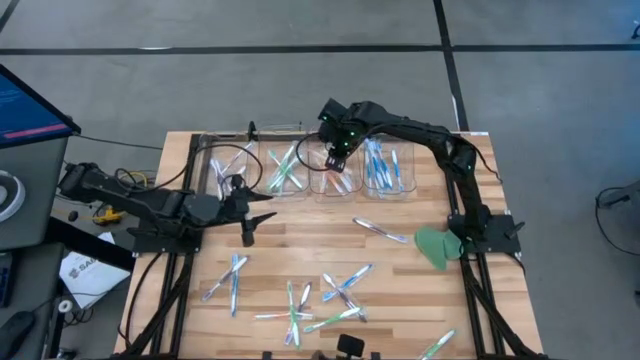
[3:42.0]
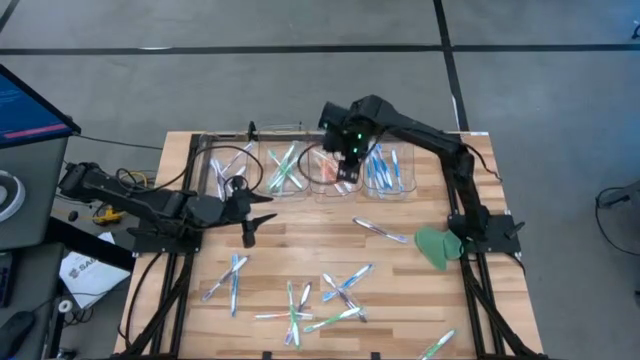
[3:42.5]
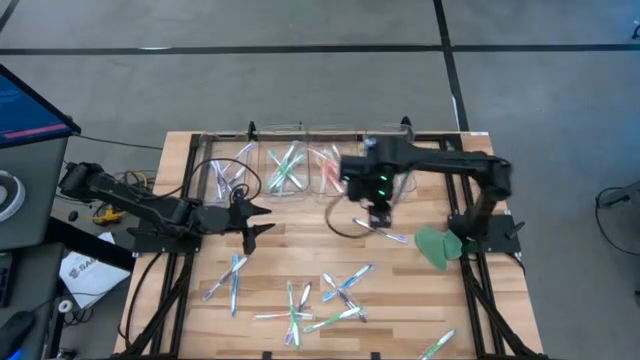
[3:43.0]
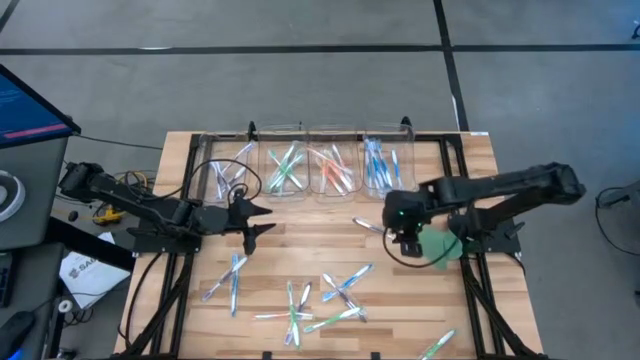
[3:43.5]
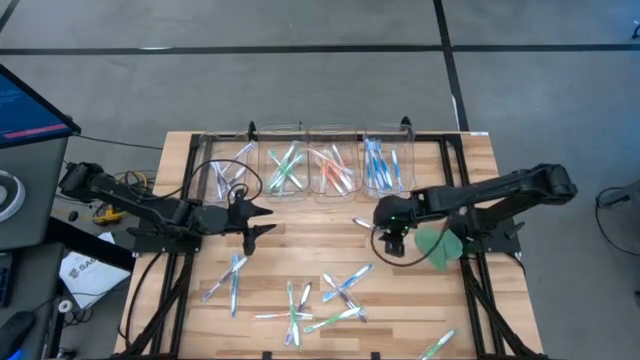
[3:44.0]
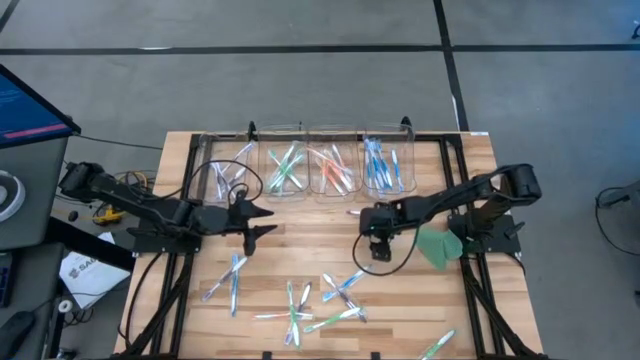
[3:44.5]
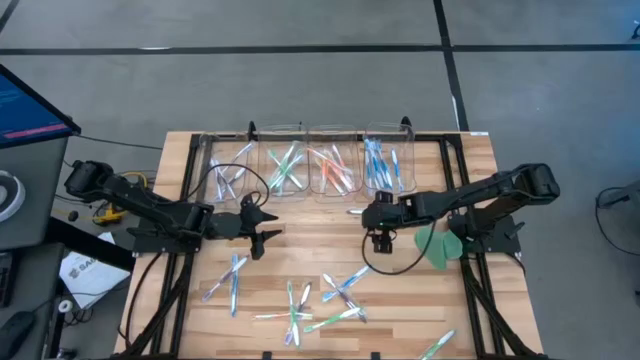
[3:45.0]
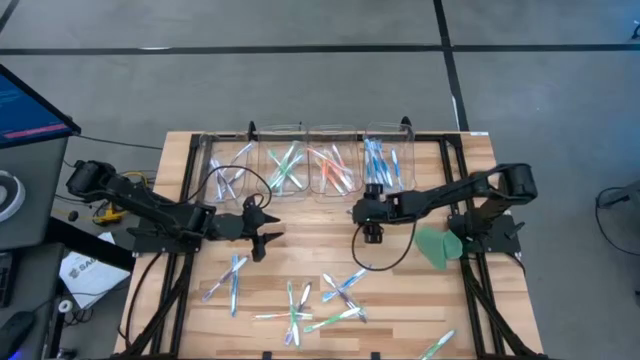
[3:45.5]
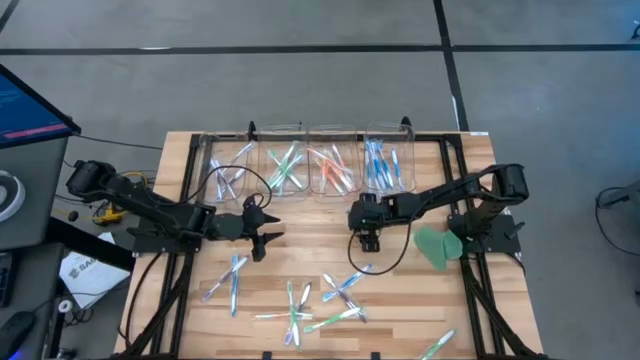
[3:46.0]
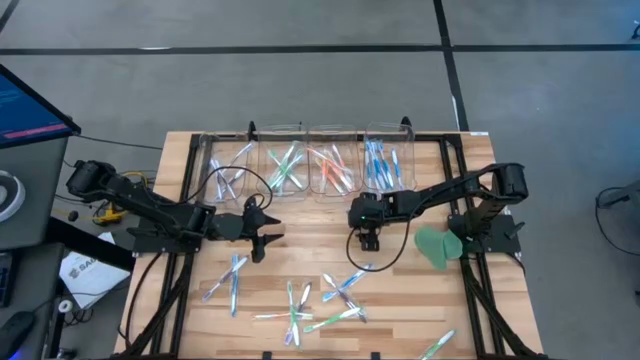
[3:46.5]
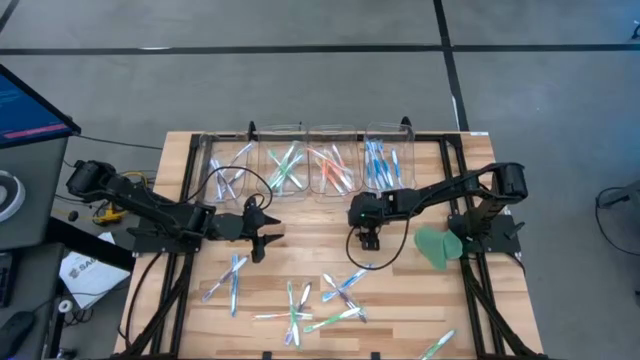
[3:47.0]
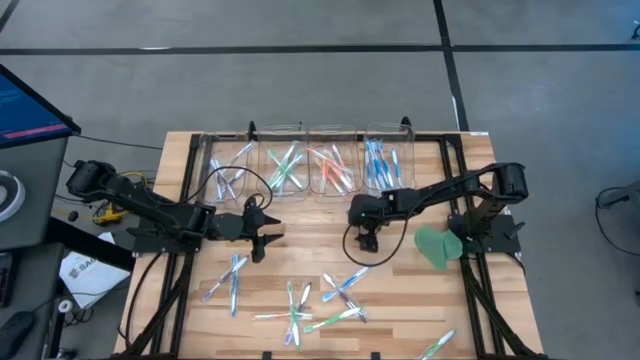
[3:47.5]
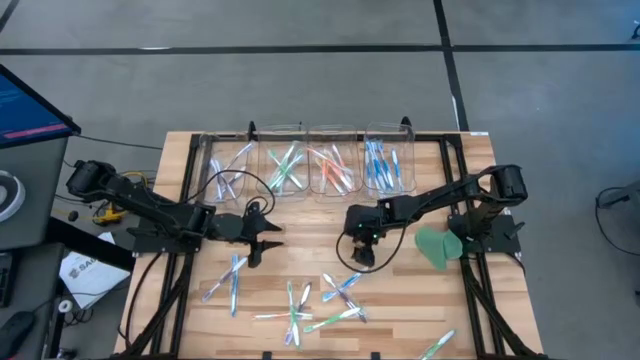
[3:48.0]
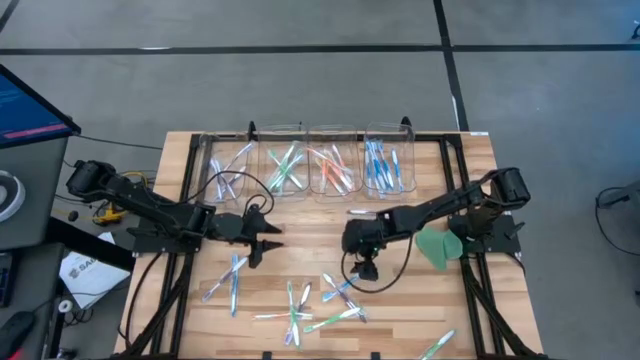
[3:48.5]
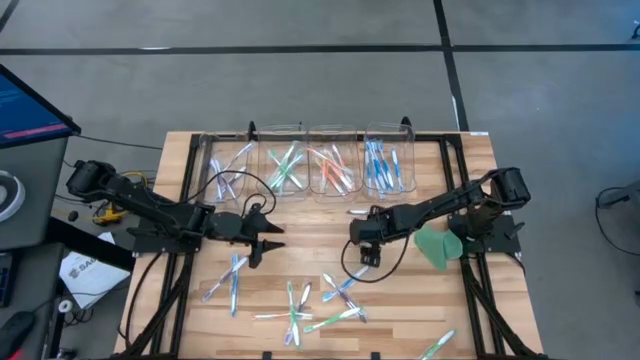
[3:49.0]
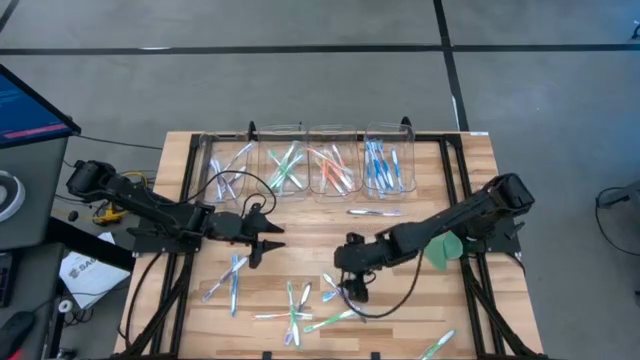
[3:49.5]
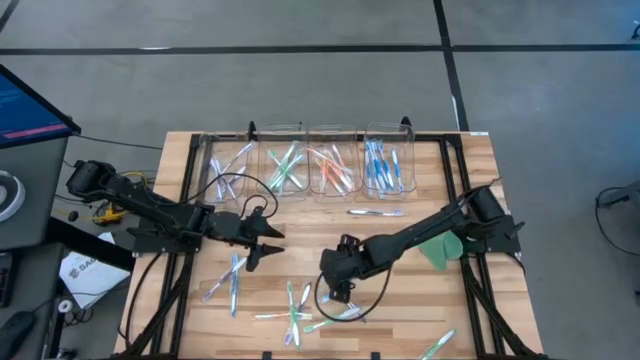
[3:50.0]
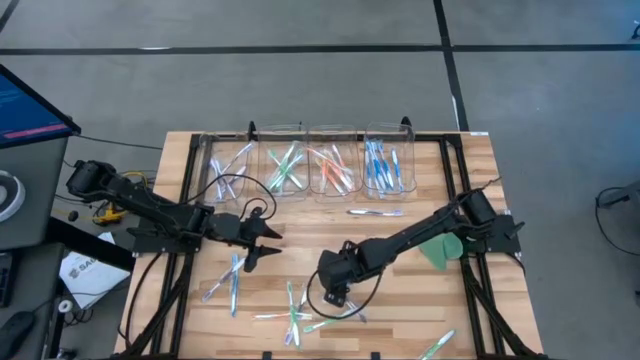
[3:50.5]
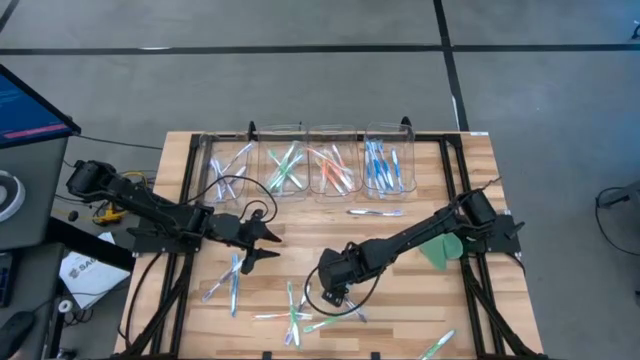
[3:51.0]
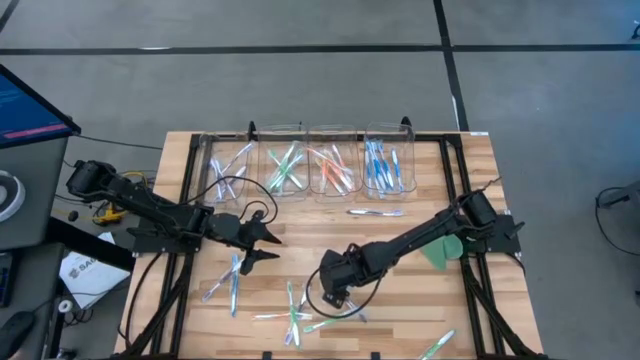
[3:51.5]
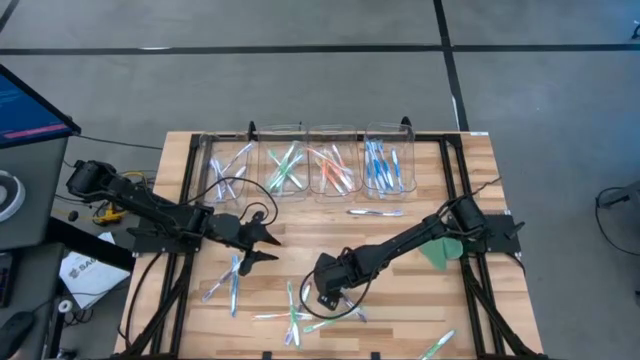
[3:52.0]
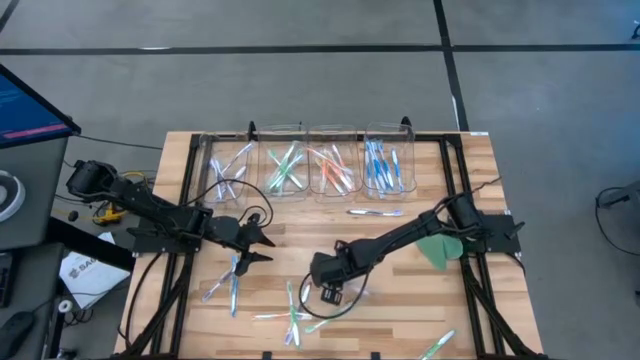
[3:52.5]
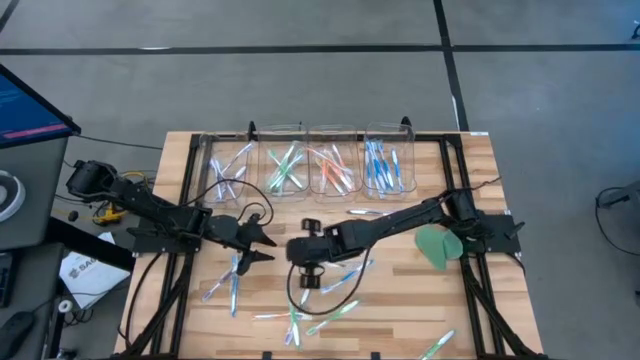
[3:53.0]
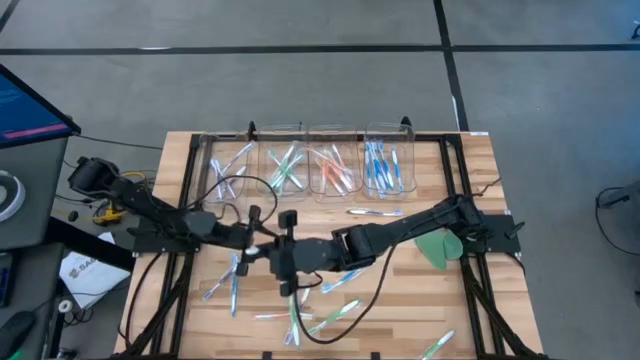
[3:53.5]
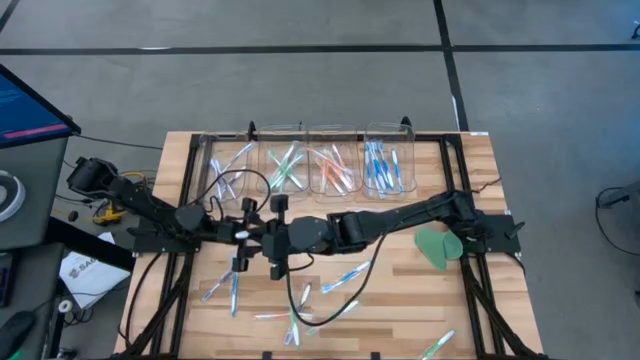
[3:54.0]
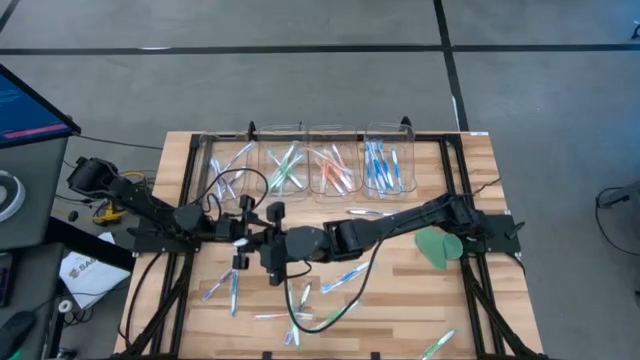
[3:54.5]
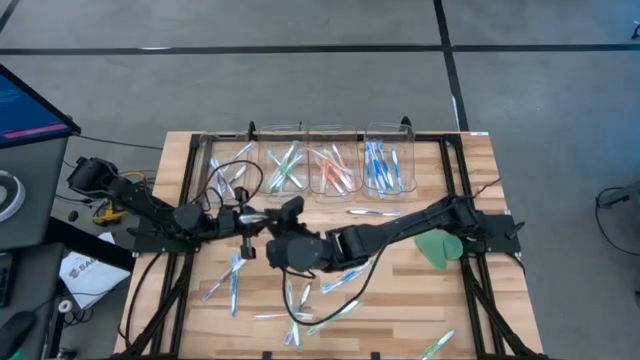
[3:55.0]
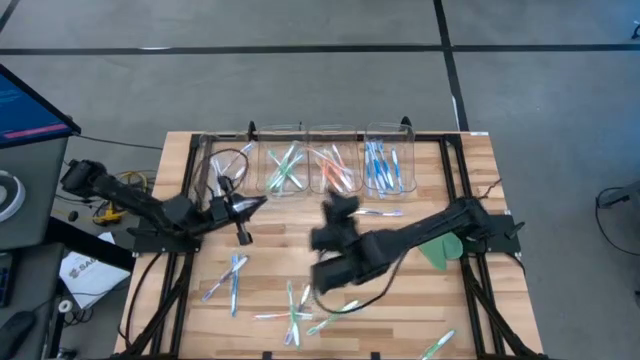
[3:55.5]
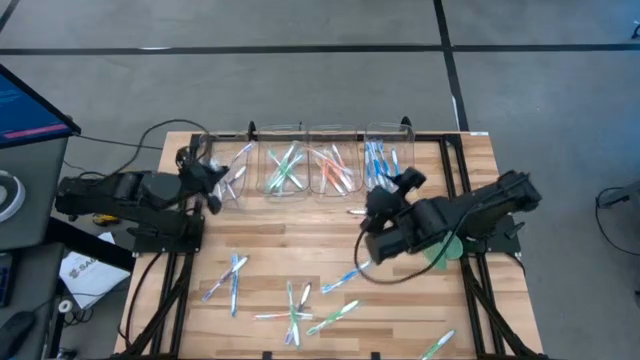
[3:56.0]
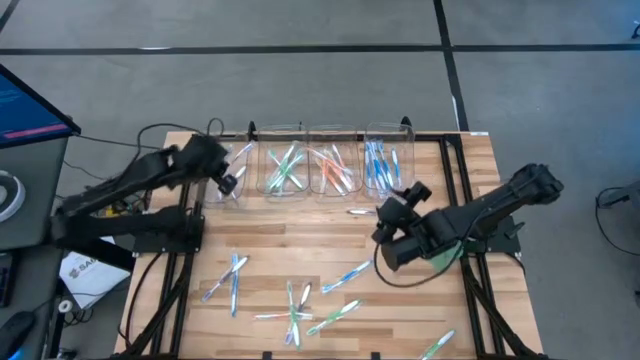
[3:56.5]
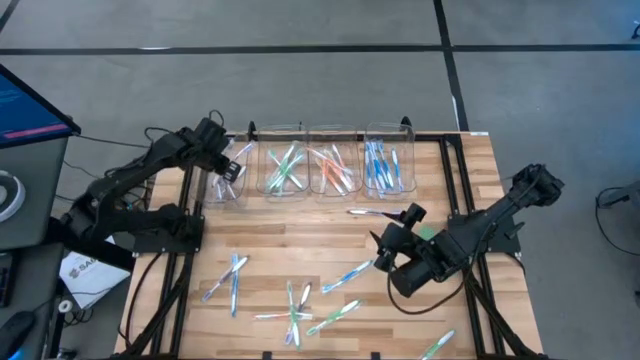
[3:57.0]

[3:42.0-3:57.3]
Task: Pick & Place Toothbrushes
Put the violet toothbrush into the left transparent bin

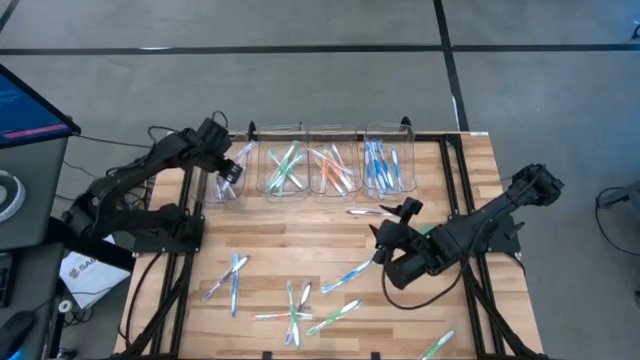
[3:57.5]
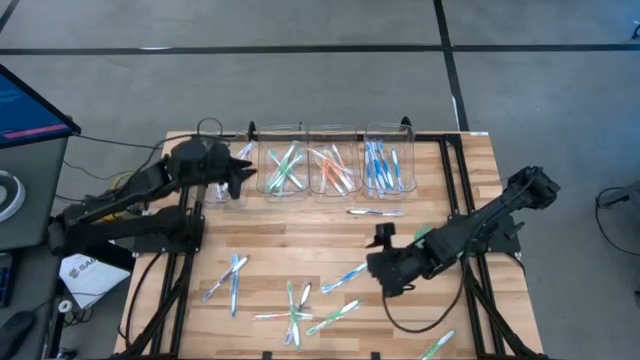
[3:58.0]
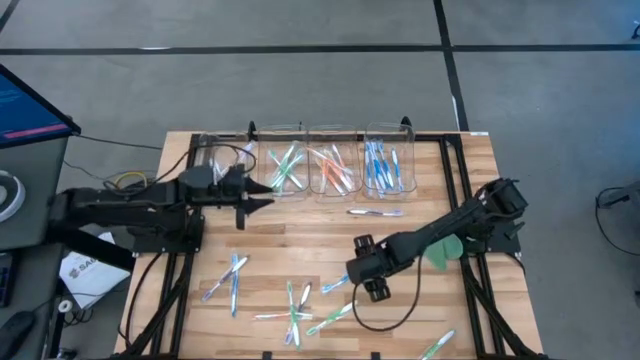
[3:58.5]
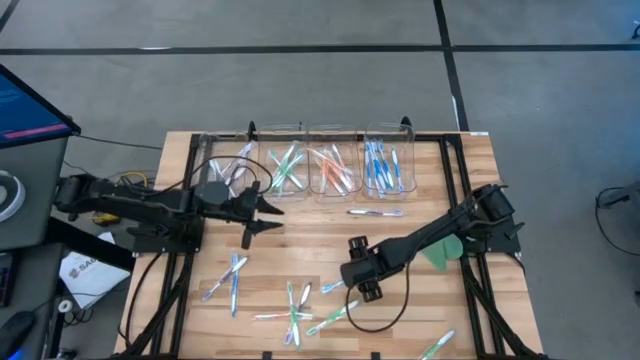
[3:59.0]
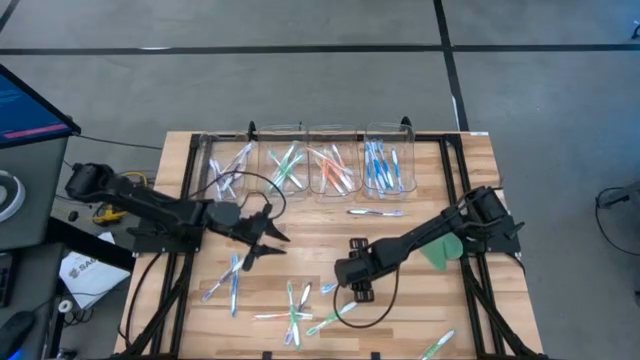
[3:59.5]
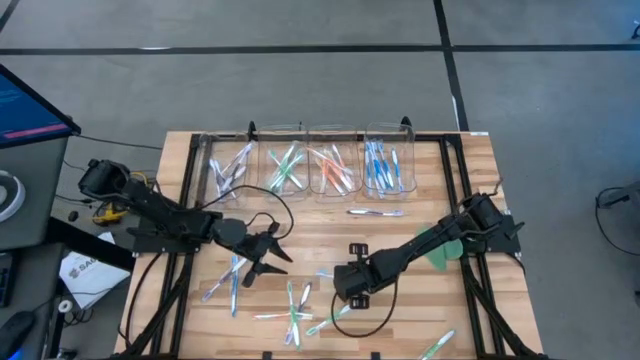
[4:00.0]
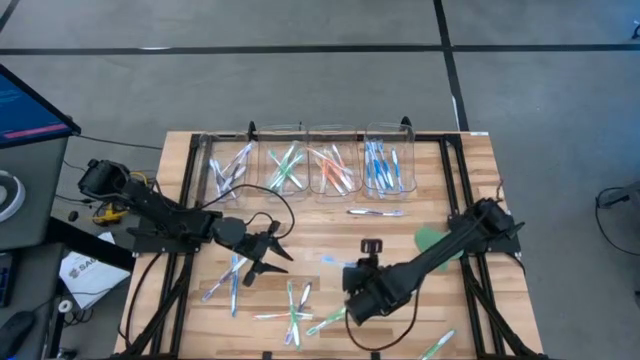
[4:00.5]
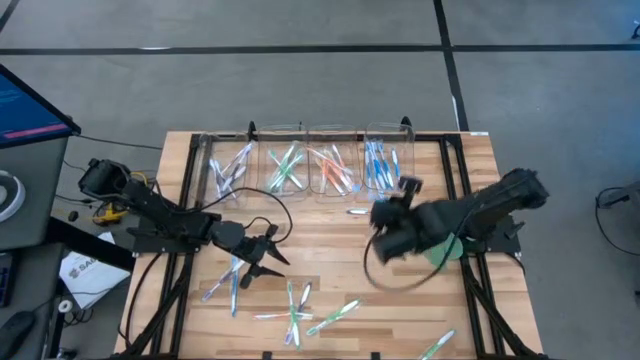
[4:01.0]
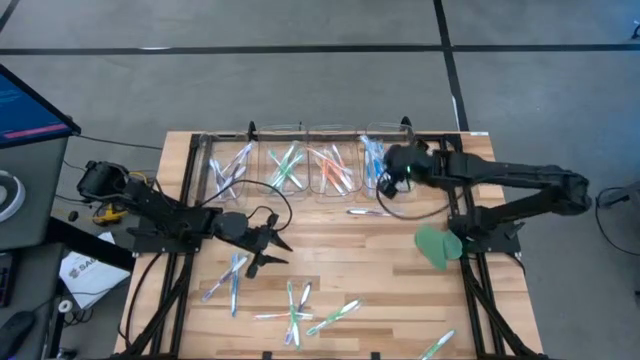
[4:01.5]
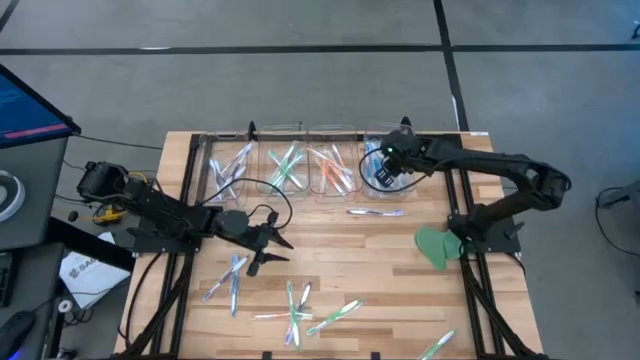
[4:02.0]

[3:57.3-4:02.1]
Put the blue toothbrush into the right transparent bin
